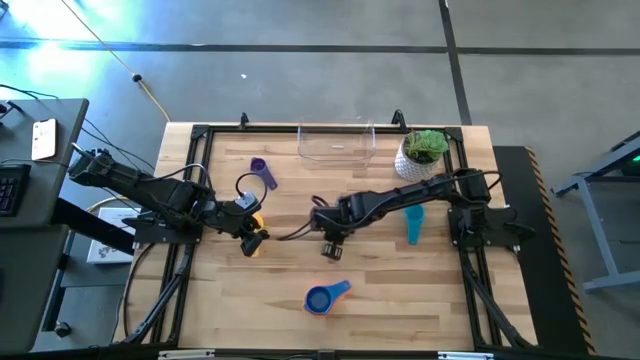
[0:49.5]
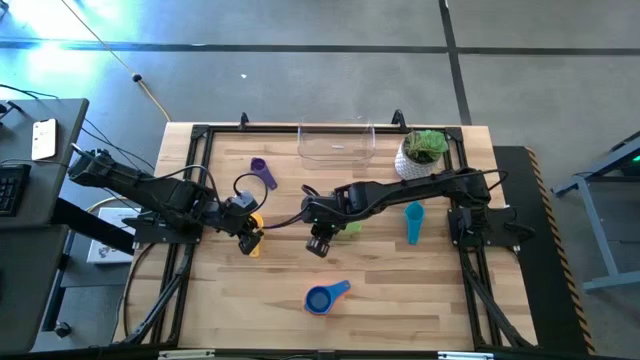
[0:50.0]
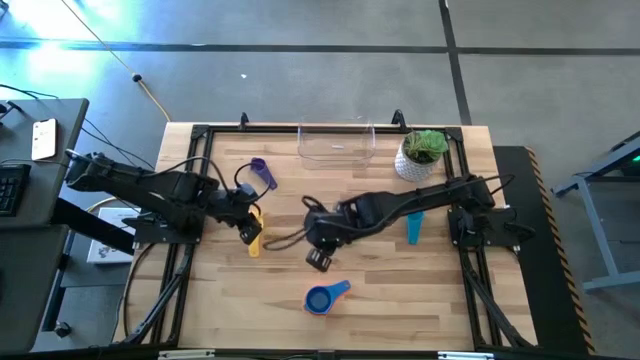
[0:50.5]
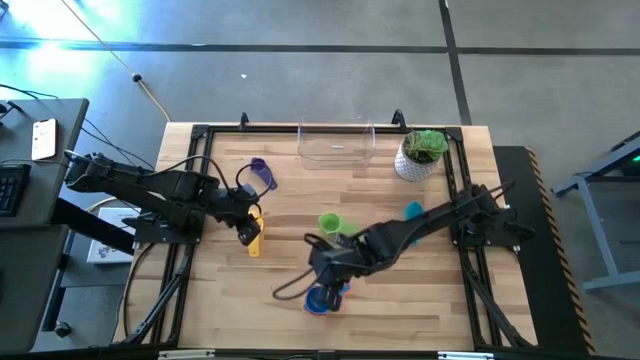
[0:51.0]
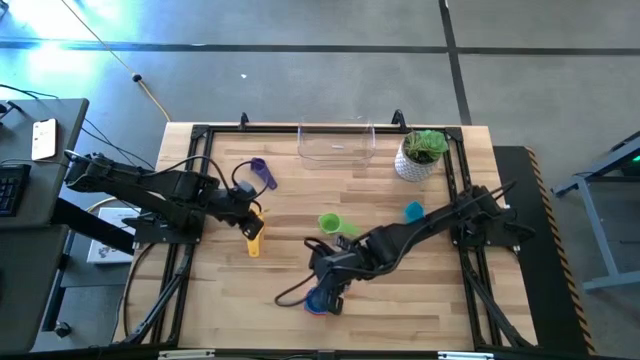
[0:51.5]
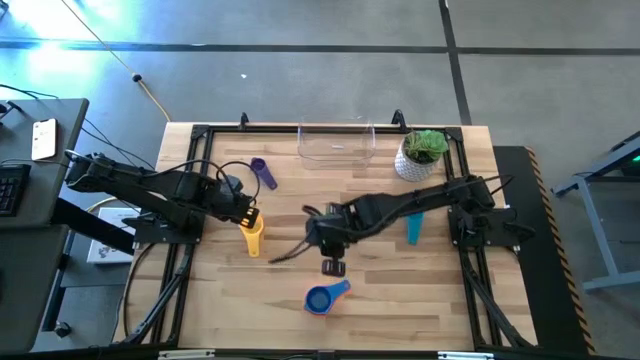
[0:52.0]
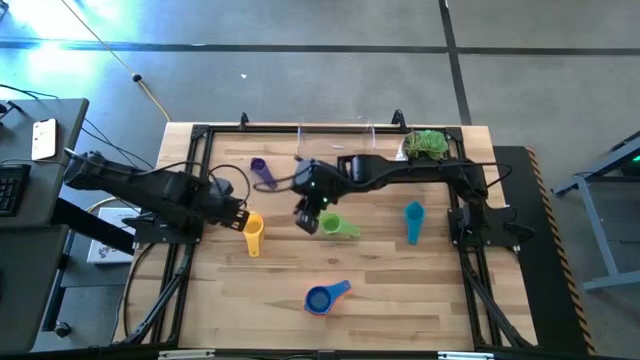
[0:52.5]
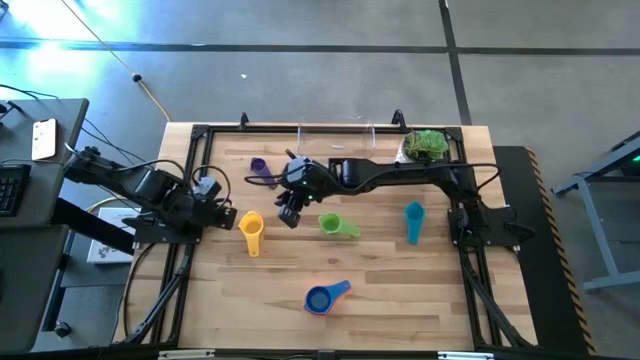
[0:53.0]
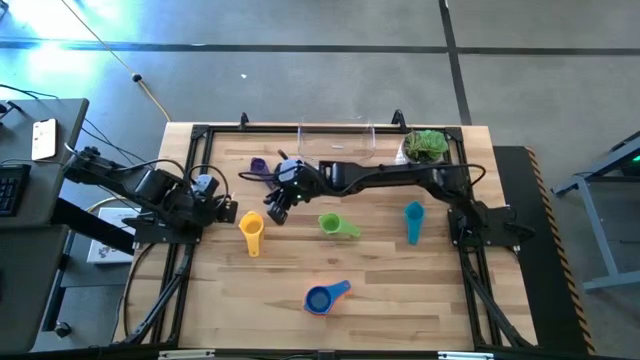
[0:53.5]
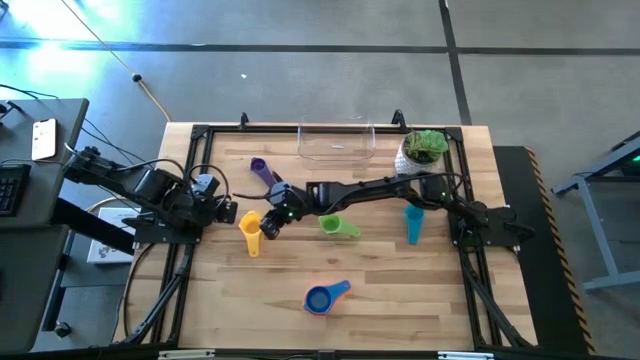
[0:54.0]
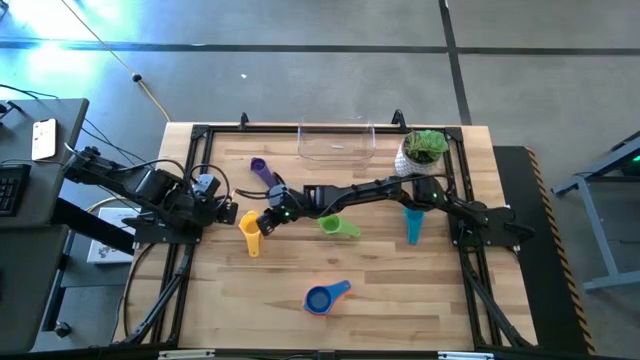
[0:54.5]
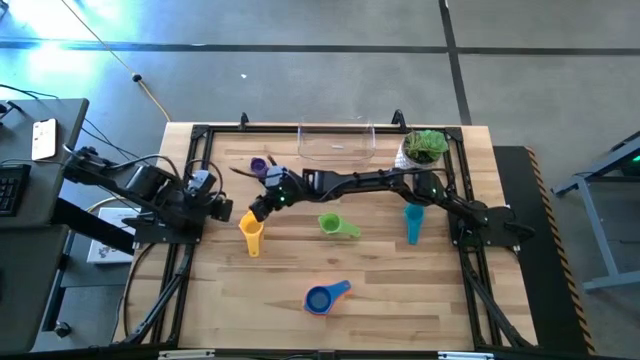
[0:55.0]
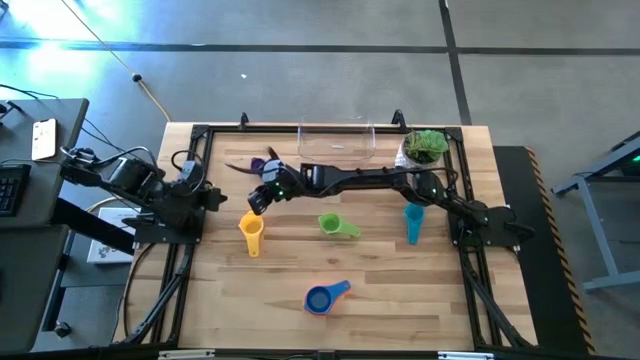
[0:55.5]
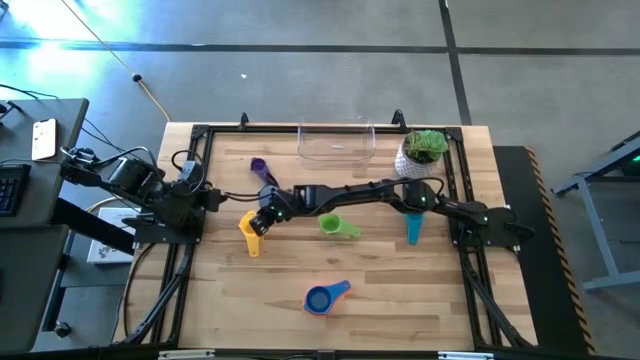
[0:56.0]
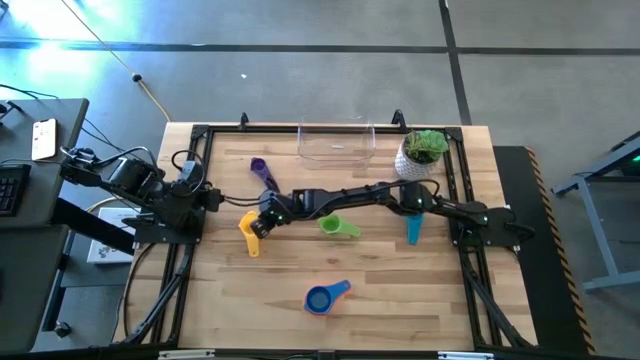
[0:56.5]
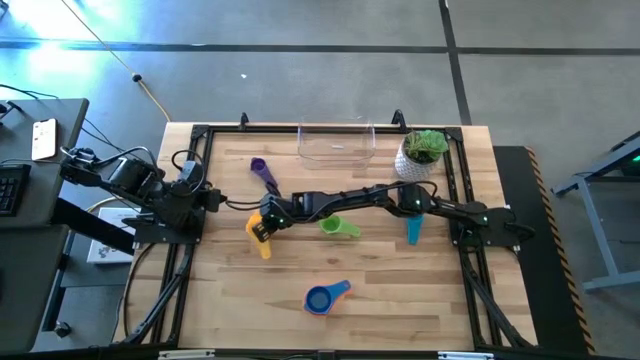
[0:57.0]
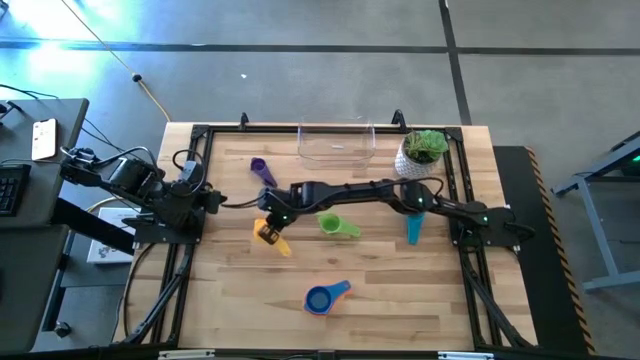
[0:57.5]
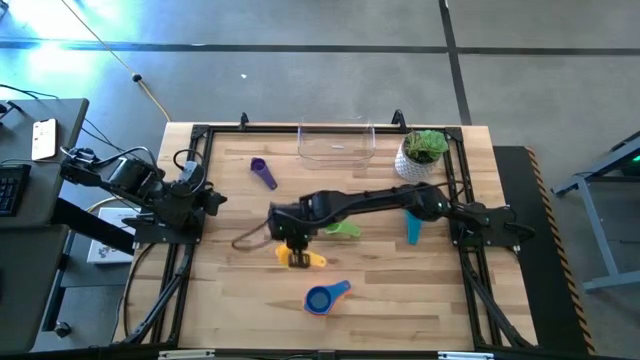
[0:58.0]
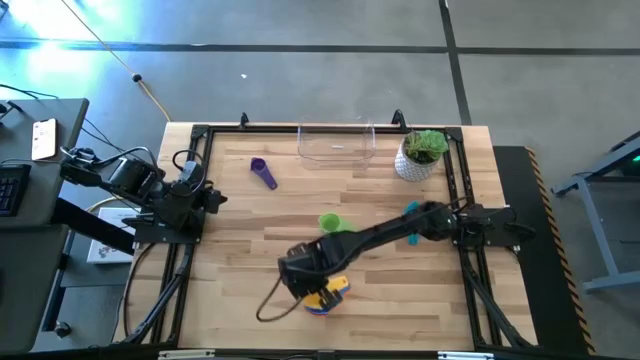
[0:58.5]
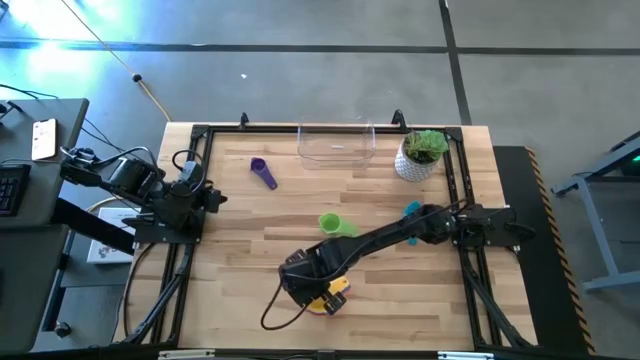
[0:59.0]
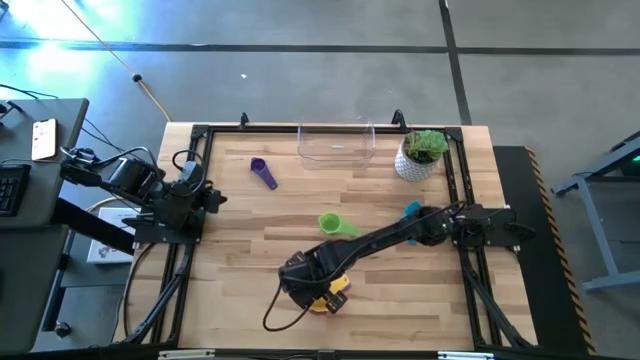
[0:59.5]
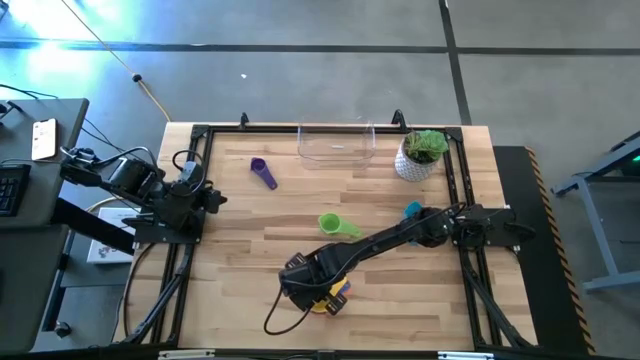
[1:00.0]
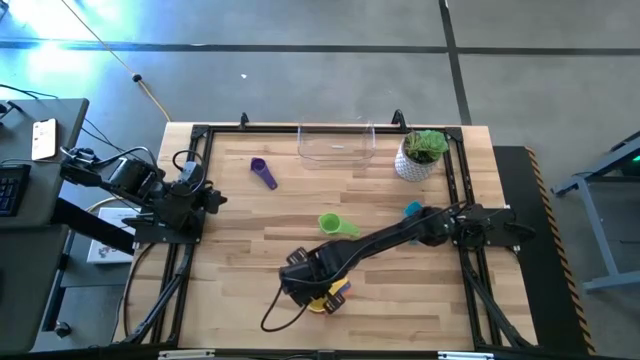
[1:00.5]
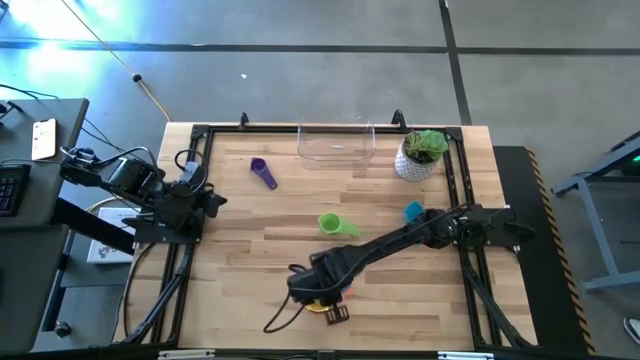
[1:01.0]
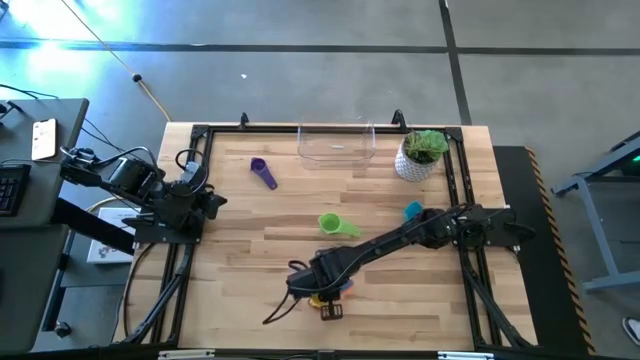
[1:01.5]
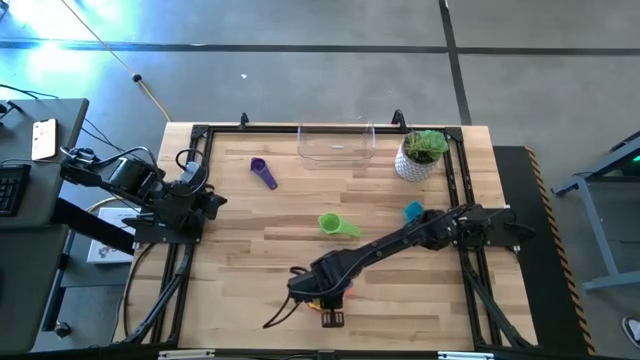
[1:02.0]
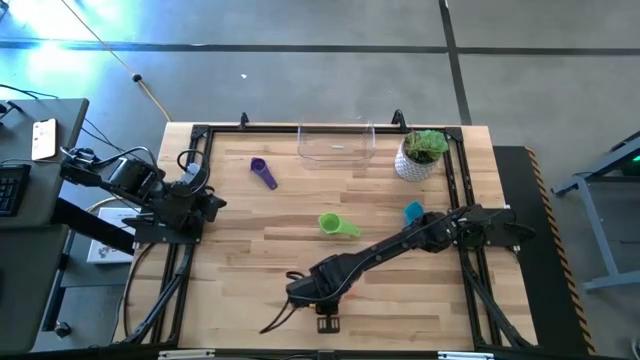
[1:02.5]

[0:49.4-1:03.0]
Task: Nest measuring cups in basket
Stack the yellow measuring cup on top of the blue measuring cup

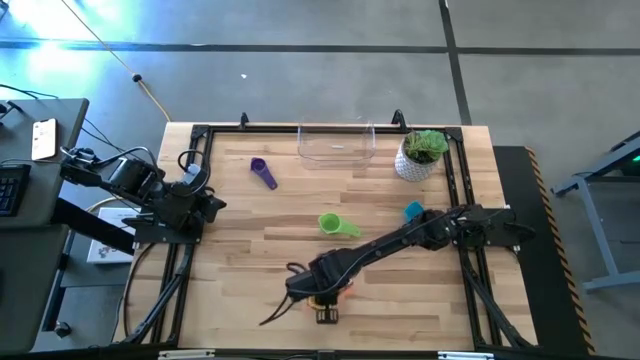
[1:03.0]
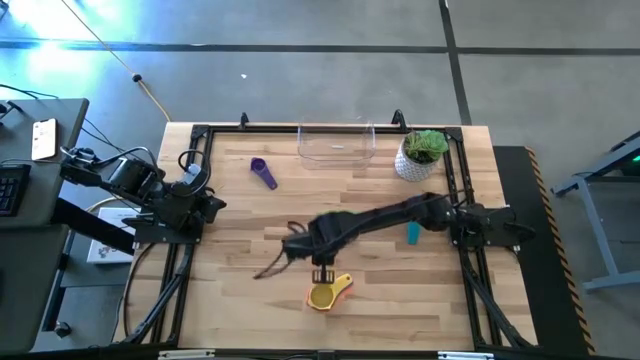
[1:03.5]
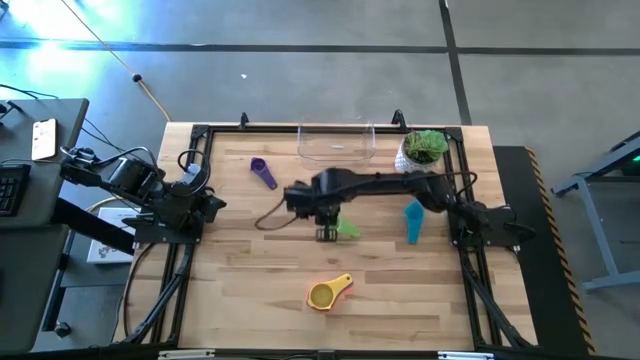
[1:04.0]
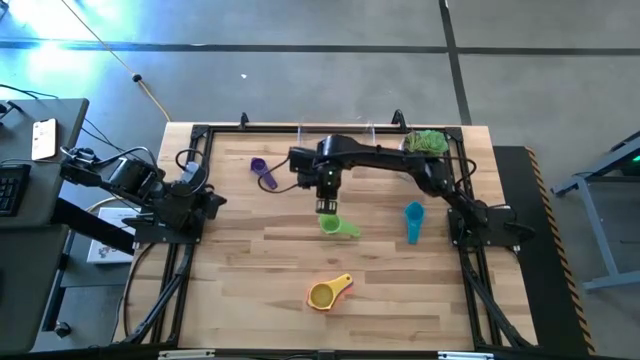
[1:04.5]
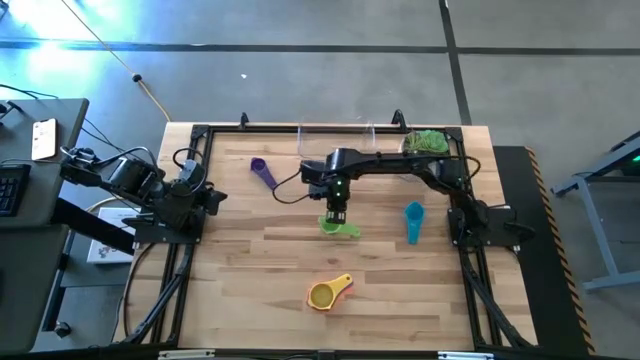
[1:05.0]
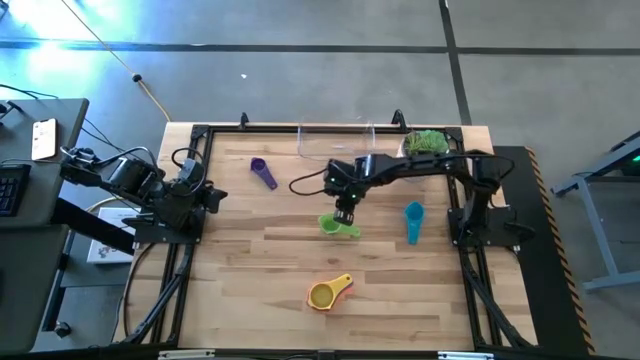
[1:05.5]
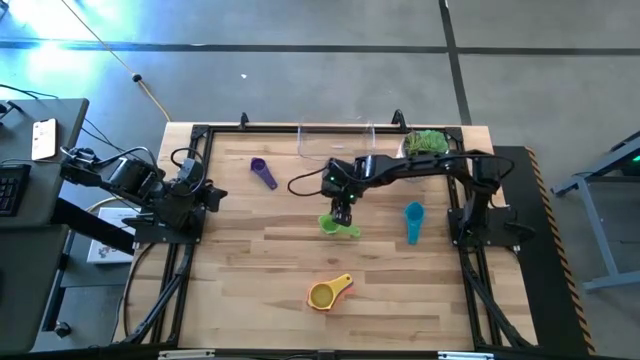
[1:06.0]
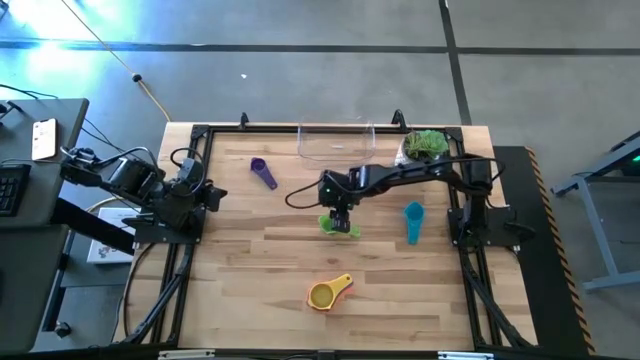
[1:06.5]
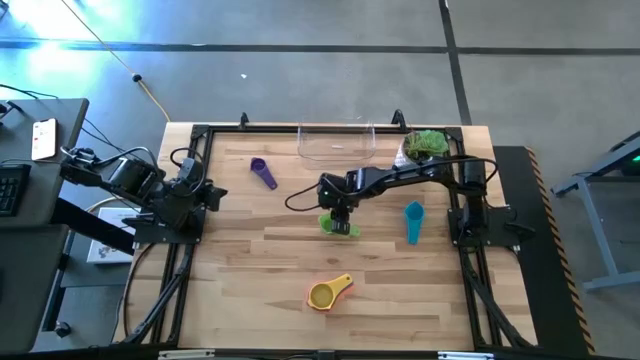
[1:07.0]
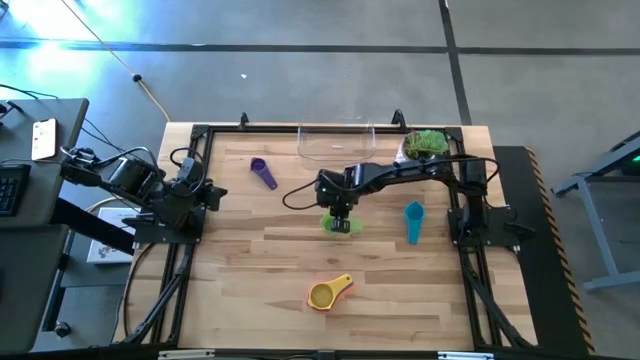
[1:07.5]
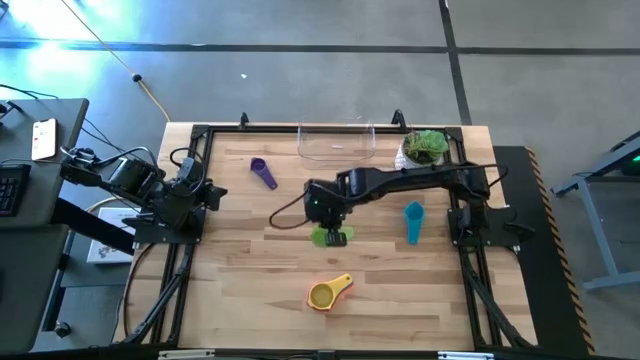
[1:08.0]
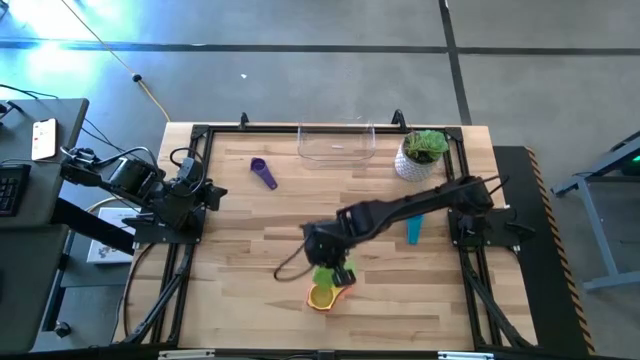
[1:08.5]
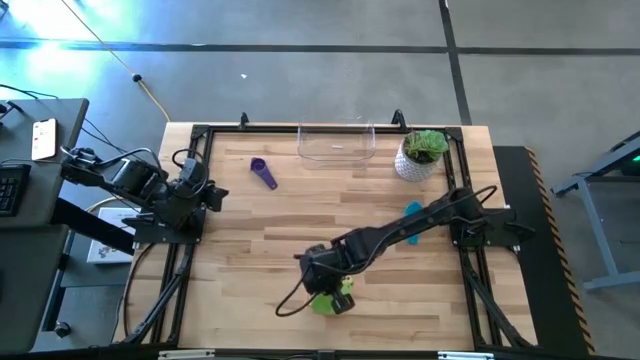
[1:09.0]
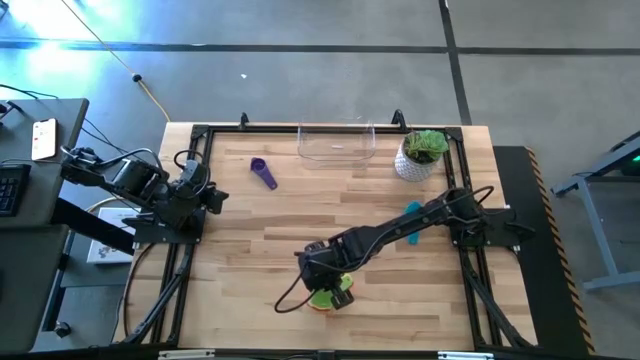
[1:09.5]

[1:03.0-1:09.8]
Stack the green measuring cup on top of the yellow measuring cup
